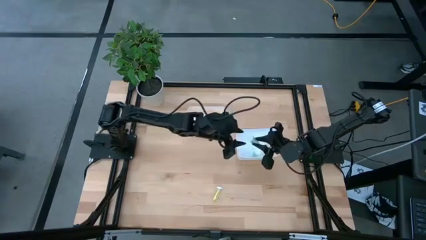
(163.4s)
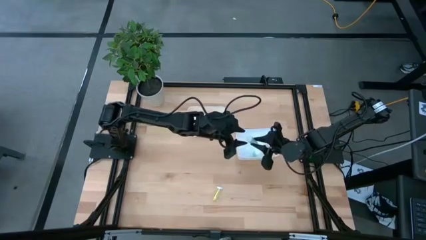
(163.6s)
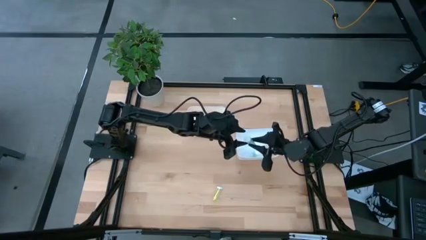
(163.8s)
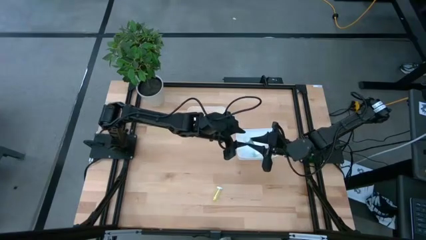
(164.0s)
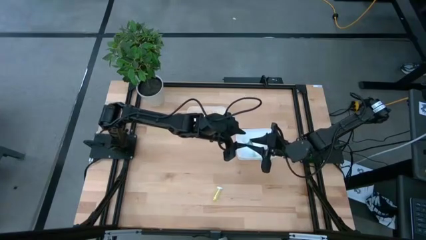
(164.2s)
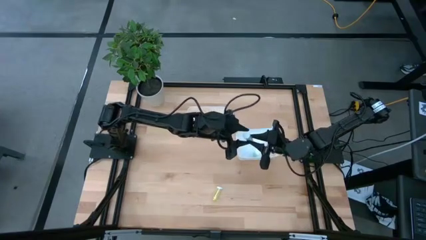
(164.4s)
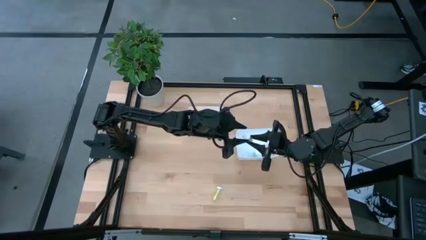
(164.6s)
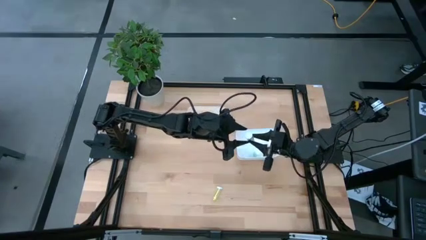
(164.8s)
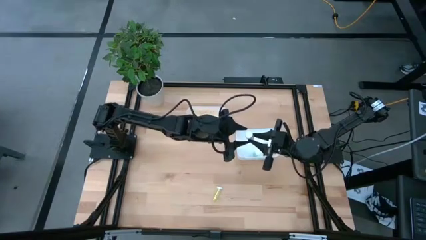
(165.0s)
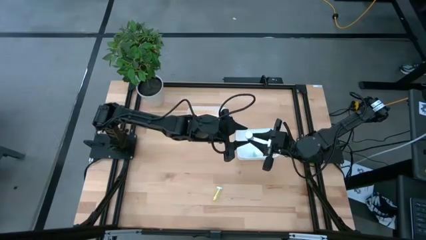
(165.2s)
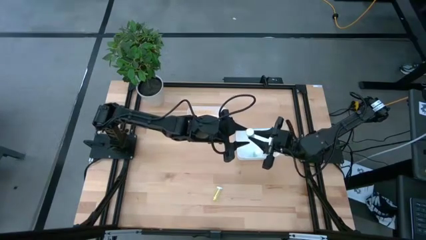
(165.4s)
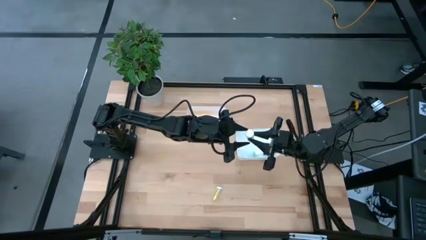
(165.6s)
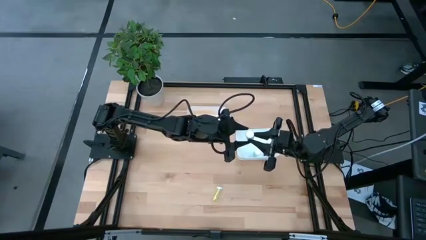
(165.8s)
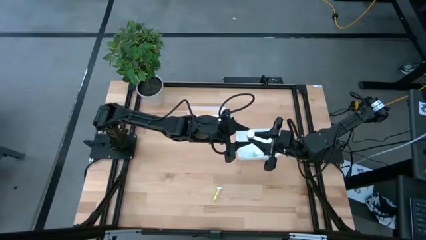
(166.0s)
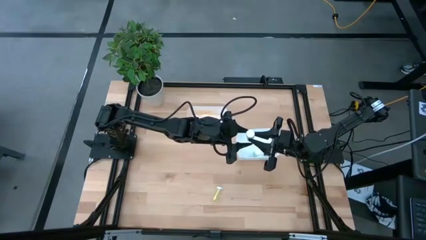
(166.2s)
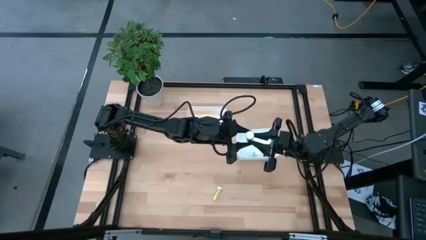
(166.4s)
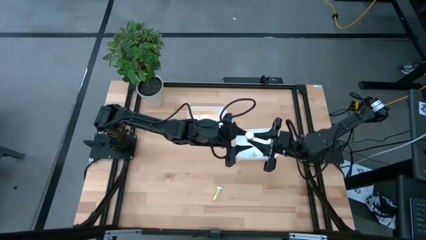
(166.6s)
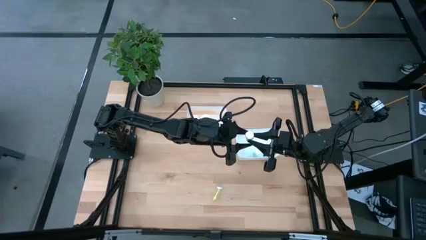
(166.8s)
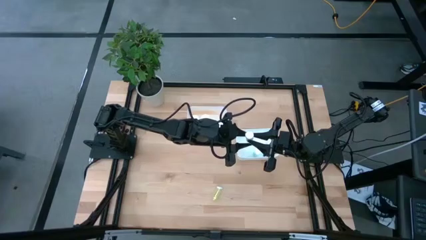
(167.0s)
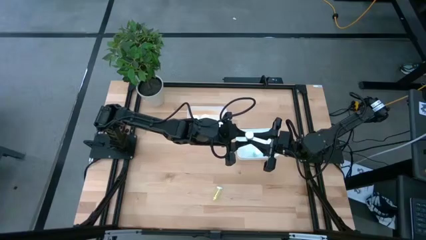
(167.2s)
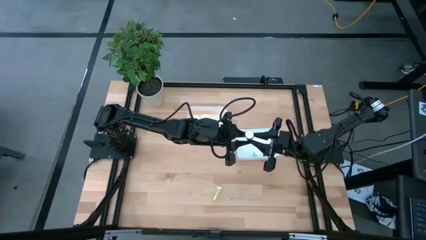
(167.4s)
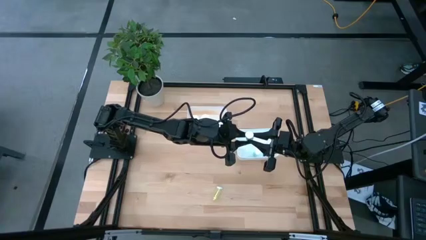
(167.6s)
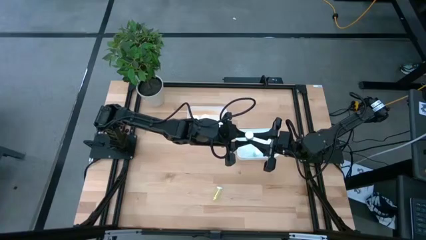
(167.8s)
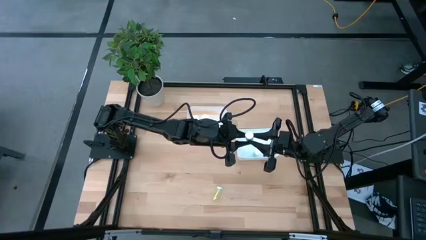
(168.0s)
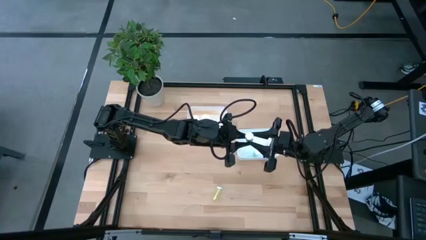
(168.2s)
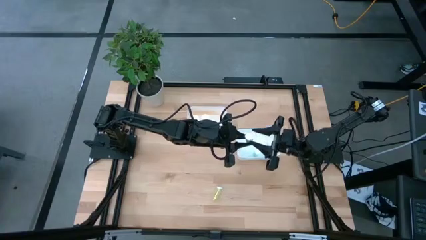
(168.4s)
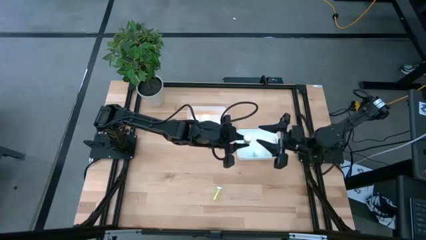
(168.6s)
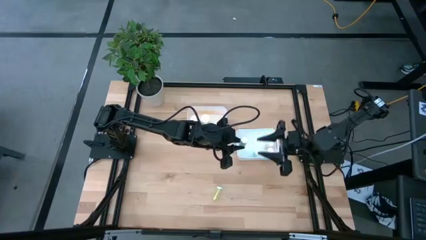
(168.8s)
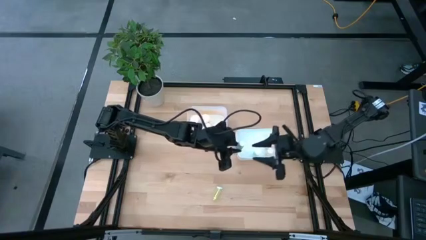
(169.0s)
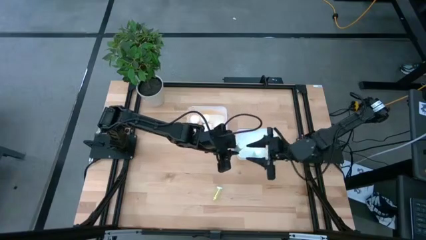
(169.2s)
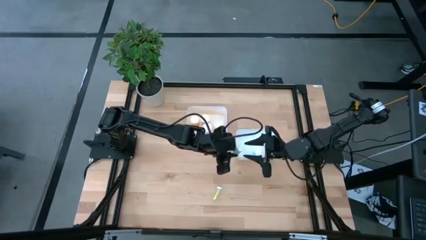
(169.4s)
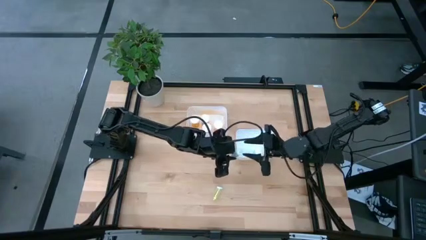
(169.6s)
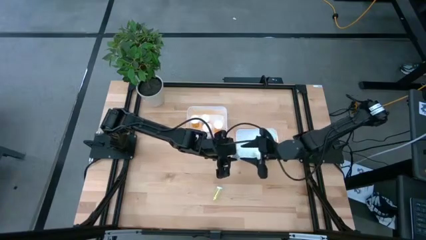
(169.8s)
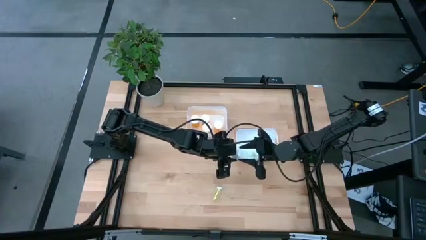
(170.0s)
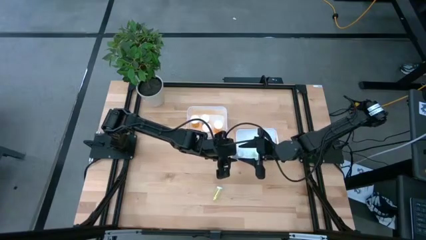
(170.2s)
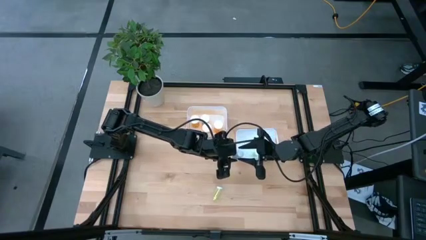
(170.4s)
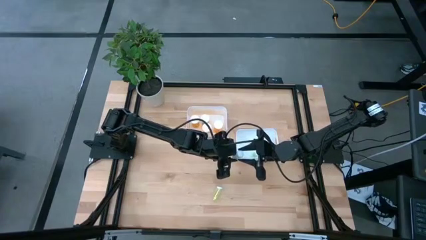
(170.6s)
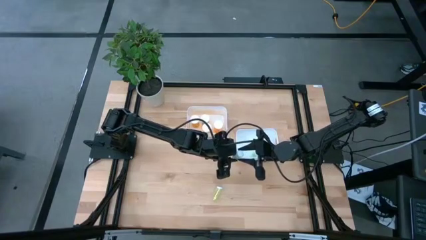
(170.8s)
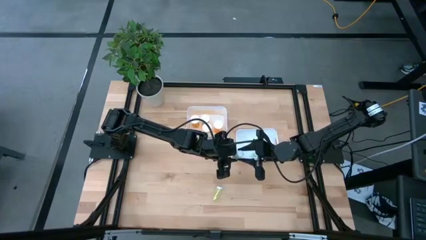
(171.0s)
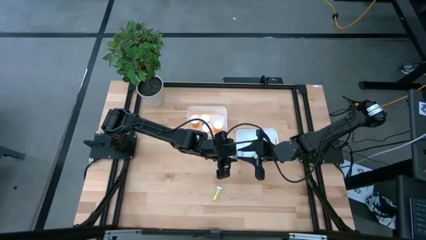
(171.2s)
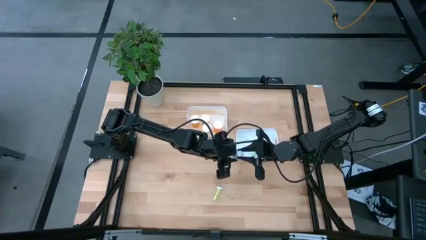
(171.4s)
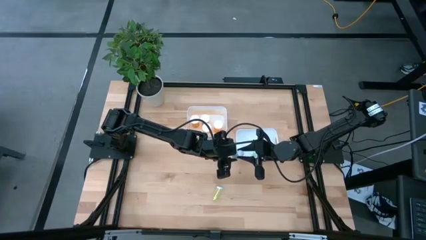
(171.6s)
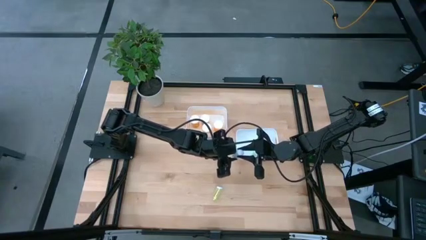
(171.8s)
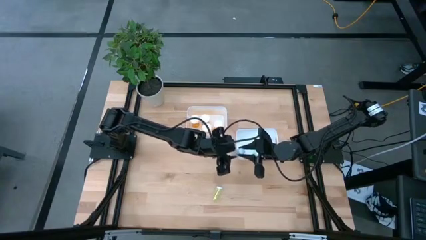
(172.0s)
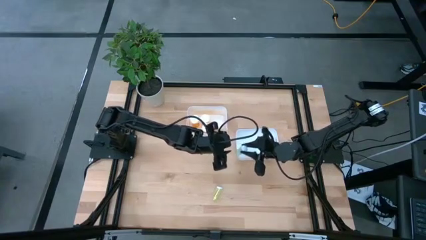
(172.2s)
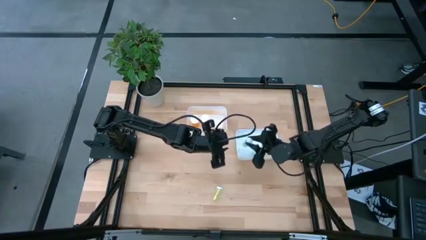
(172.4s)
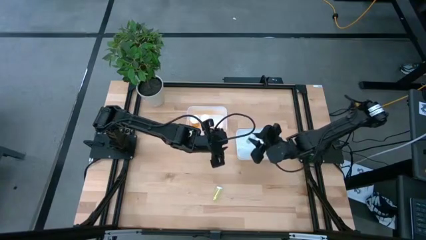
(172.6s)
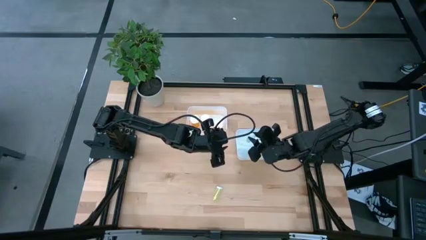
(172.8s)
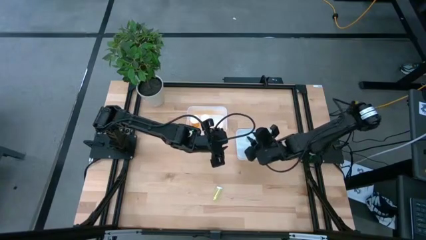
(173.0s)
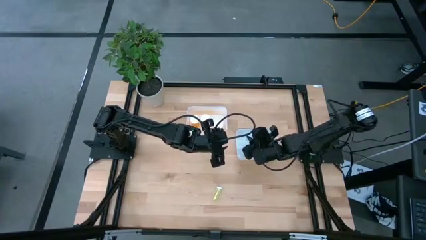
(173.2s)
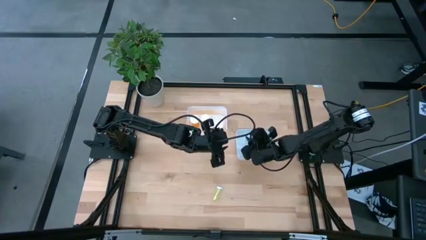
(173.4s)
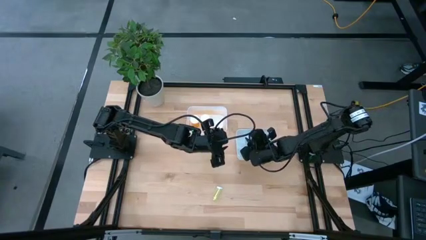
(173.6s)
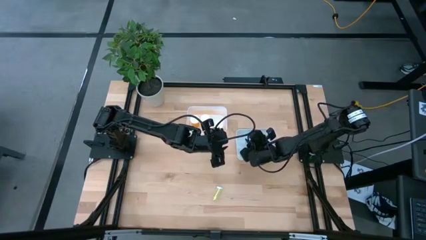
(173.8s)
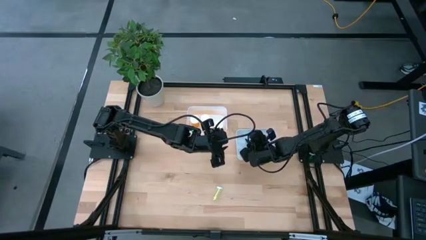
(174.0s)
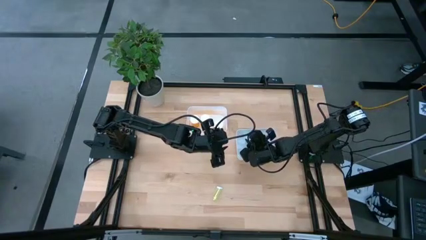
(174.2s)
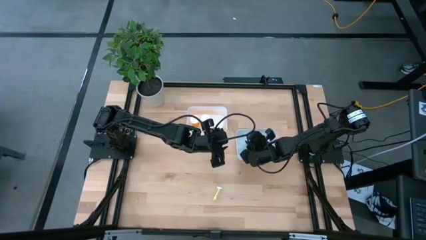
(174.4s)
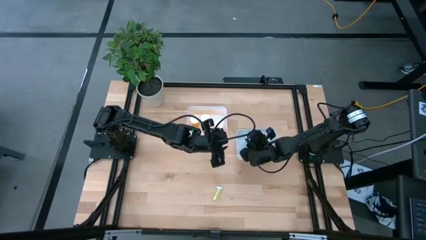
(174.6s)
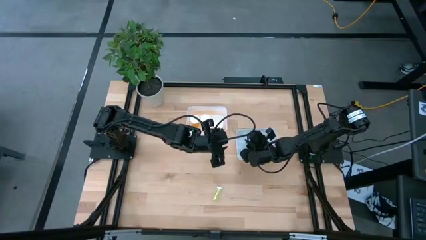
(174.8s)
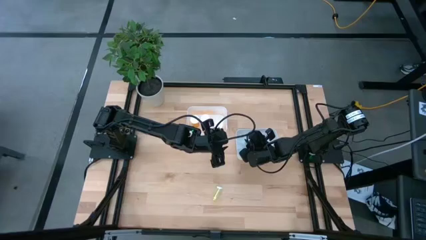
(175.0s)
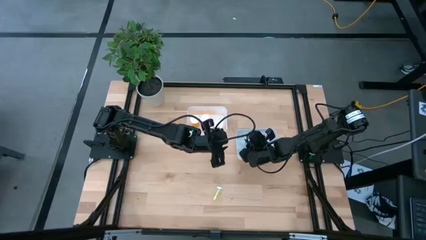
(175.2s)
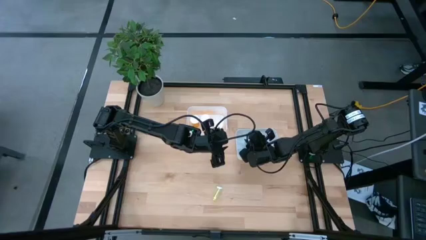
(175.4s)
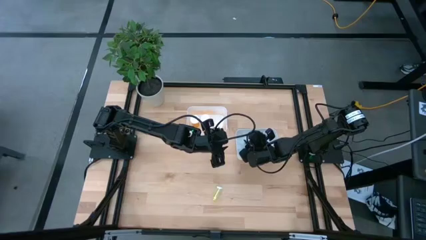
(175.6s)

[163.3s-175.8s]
Task: Pick and place medicine bottles into bin by pill shape (circle, oval)
Put the small blue pill bottle into the bottom white bin

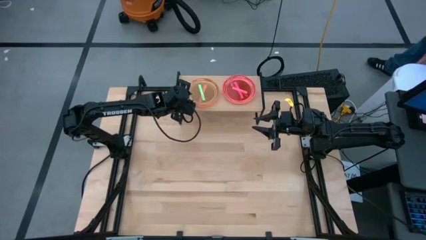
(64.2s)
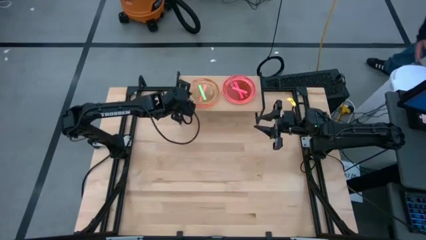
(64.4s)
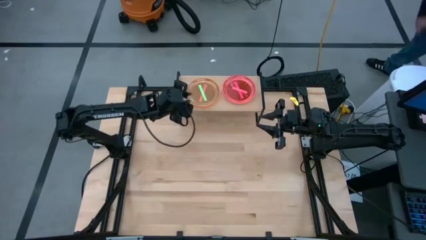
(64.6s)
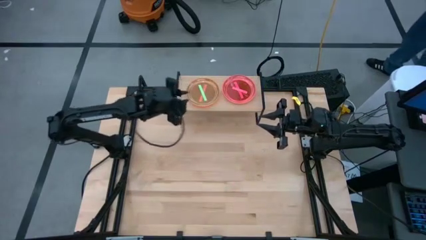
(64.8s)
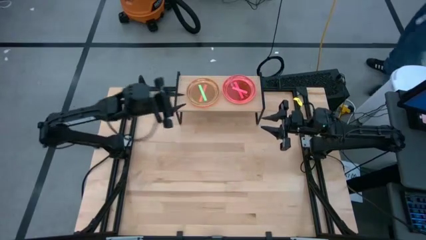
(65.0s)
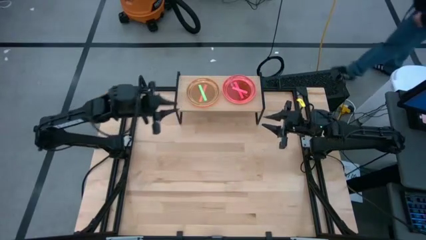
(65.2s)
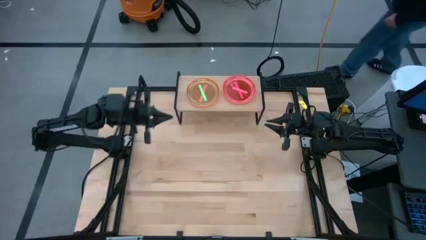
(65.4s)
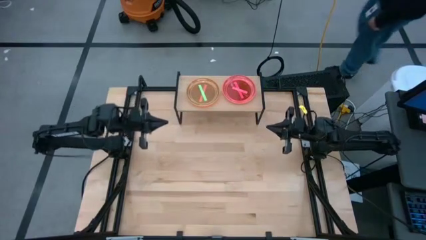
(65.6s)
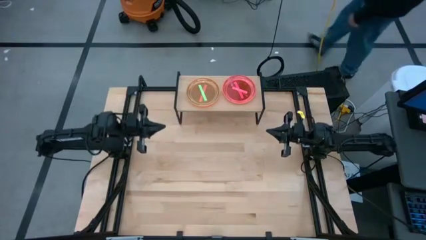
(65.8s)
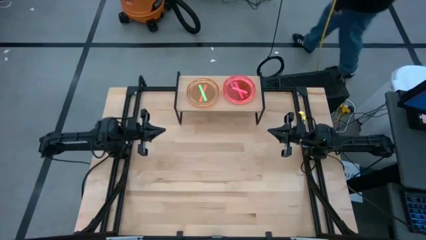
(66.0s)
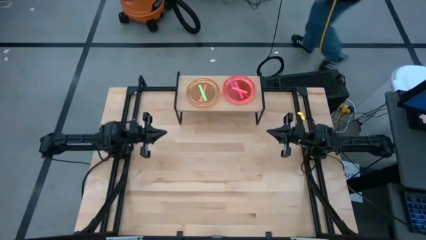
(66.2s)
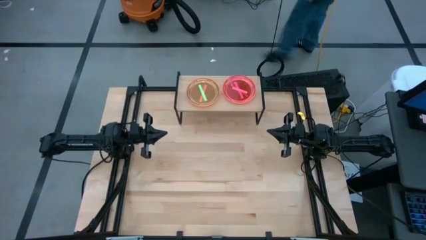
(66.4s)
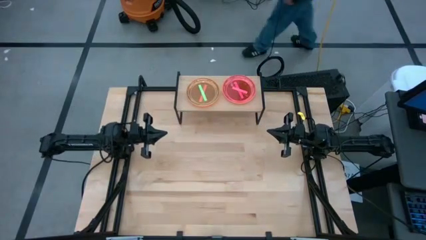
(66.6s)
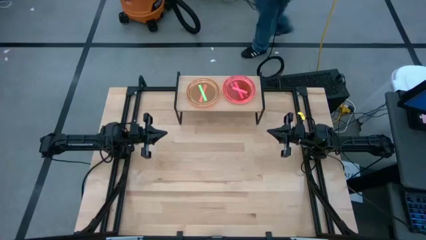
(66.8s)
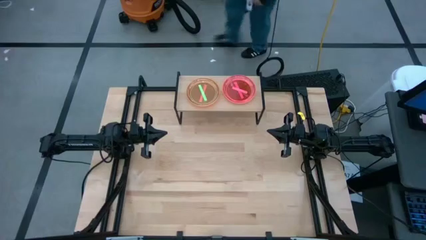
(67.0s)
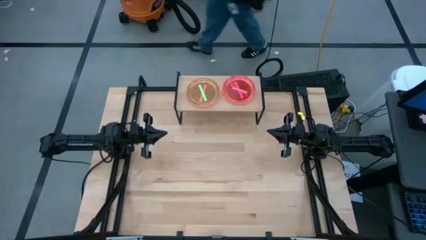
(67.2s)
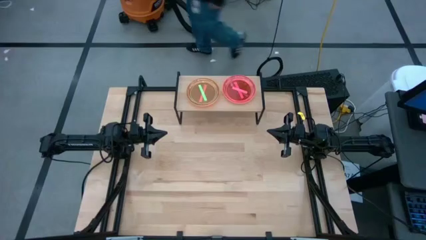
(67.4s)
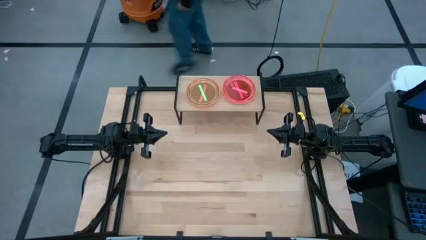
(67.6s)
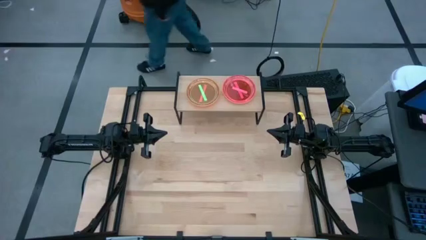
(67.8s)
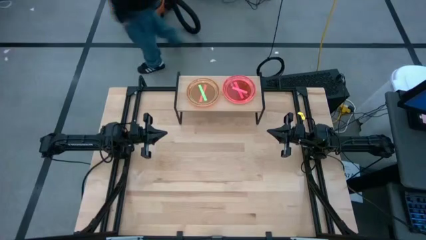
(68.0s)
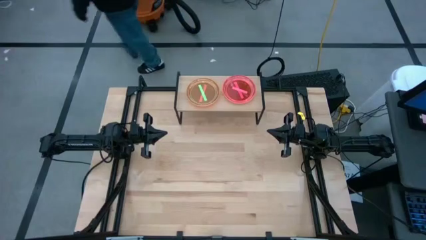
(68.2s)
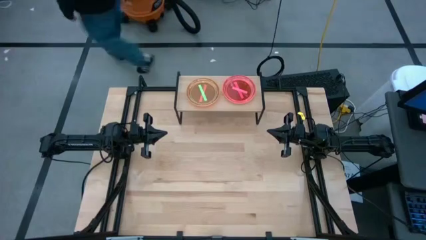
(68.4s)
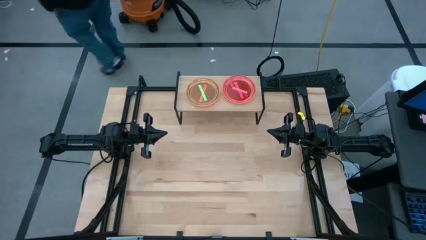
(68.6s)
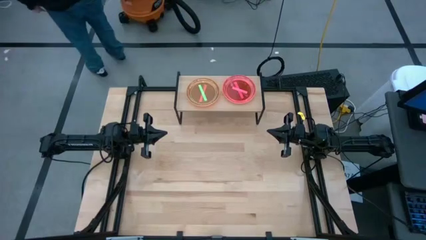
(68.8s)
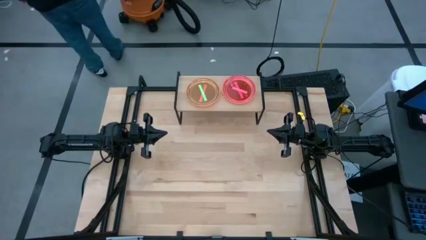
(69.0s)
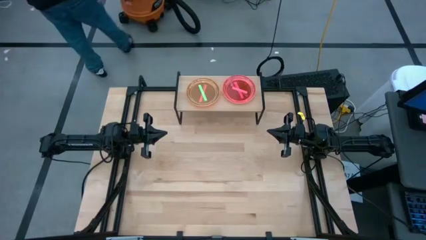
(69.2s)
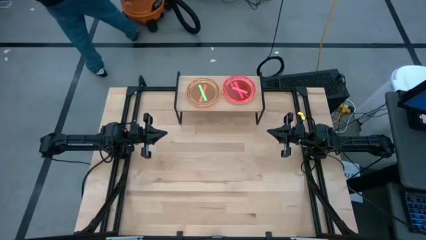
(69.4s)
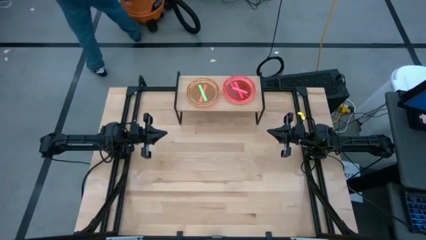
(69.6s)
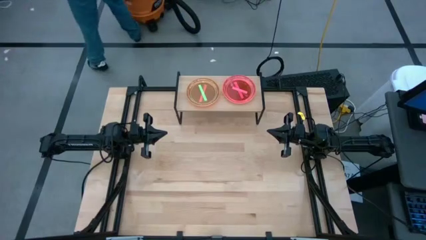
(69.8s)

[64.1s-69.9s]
Task: Place and stack plates onto a shelf
Return to Home Position
